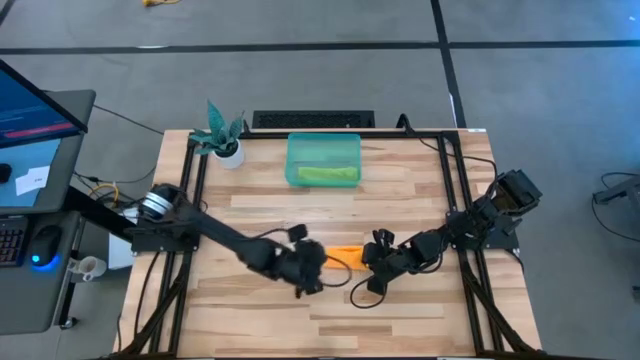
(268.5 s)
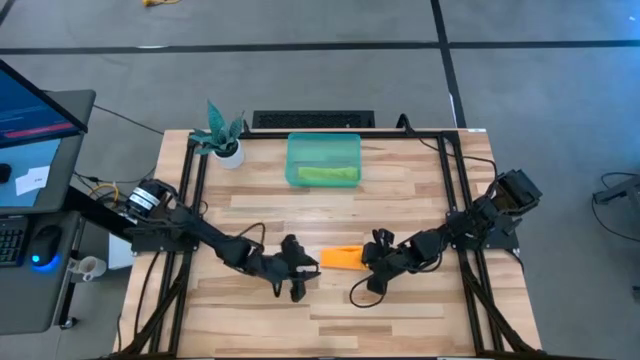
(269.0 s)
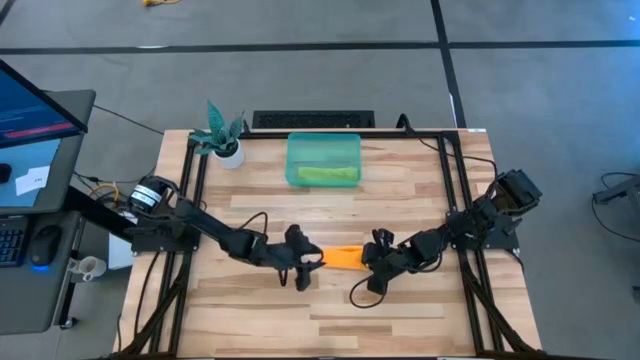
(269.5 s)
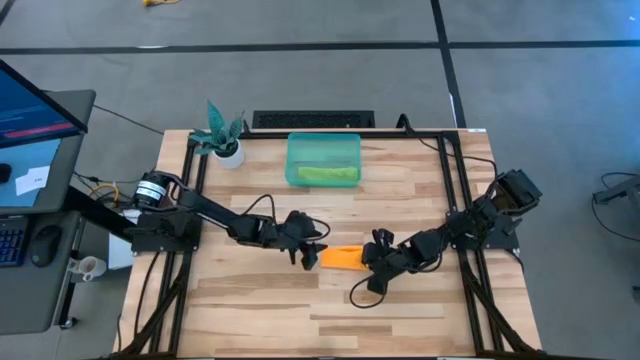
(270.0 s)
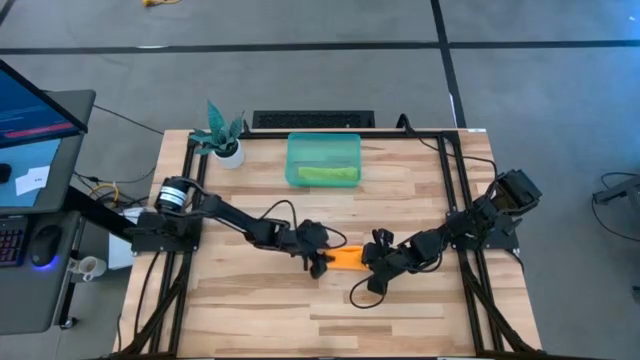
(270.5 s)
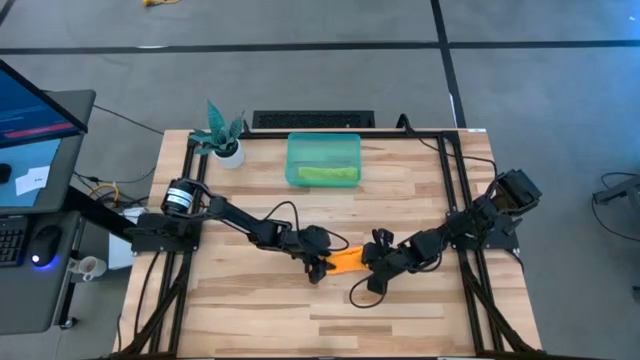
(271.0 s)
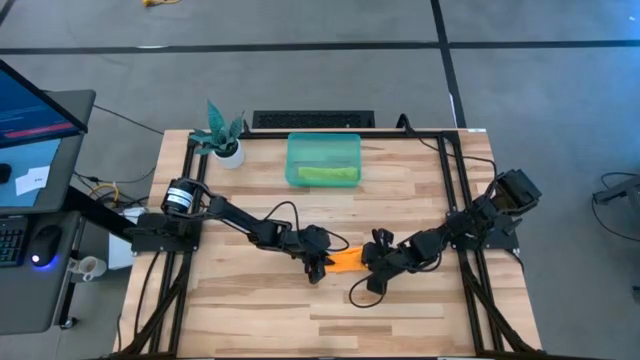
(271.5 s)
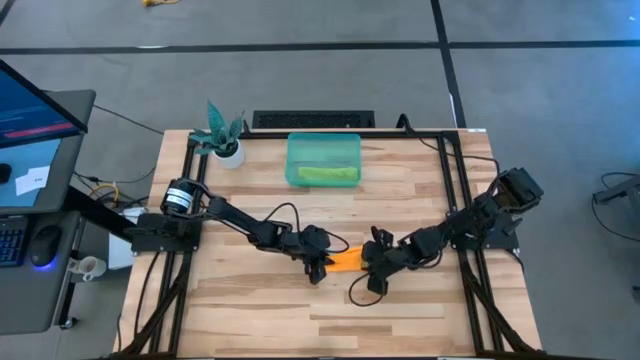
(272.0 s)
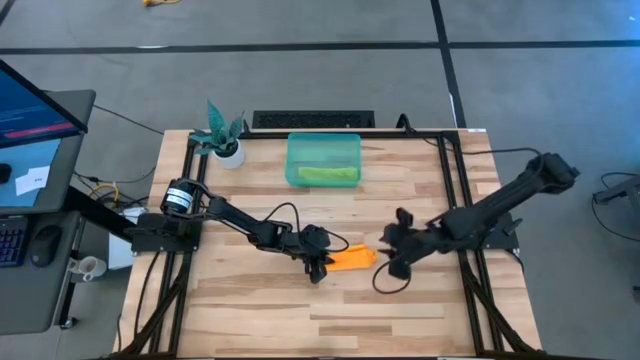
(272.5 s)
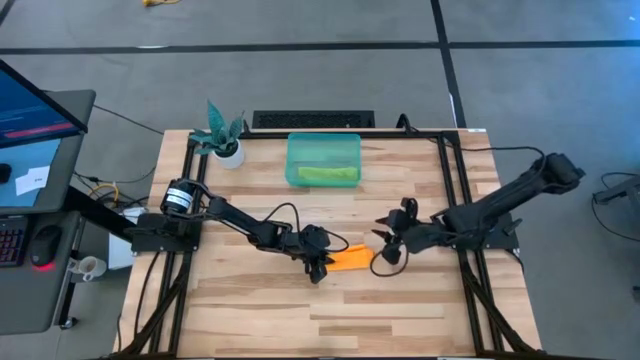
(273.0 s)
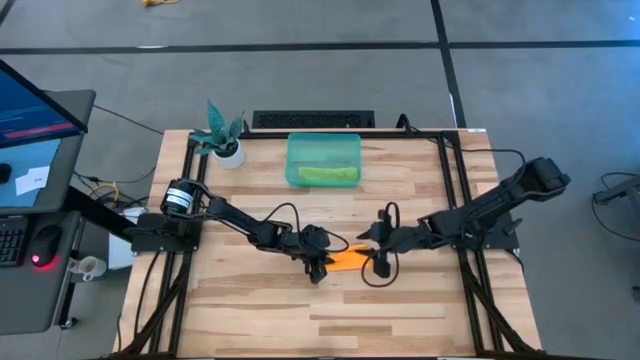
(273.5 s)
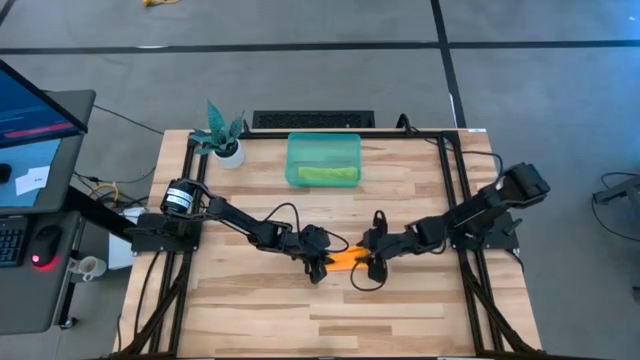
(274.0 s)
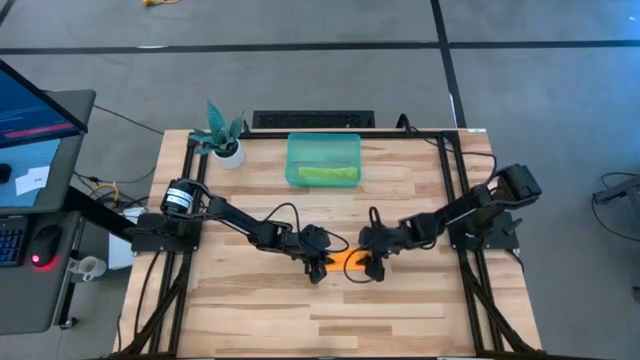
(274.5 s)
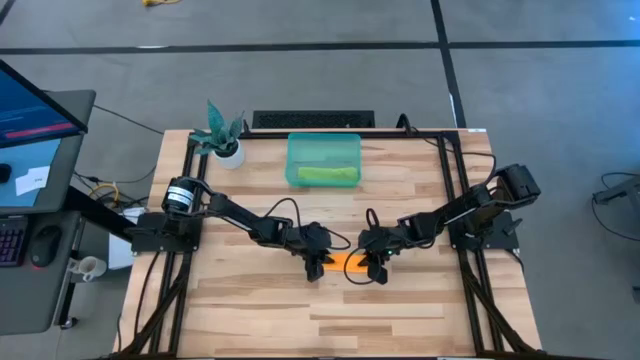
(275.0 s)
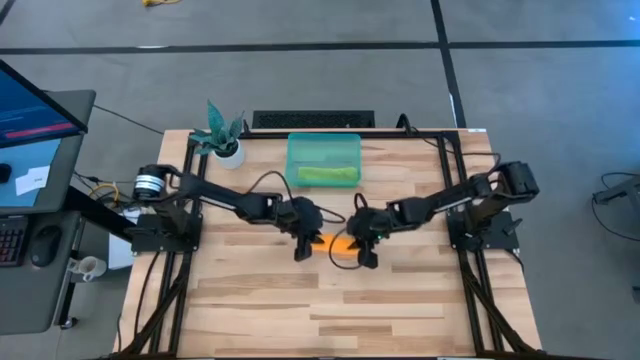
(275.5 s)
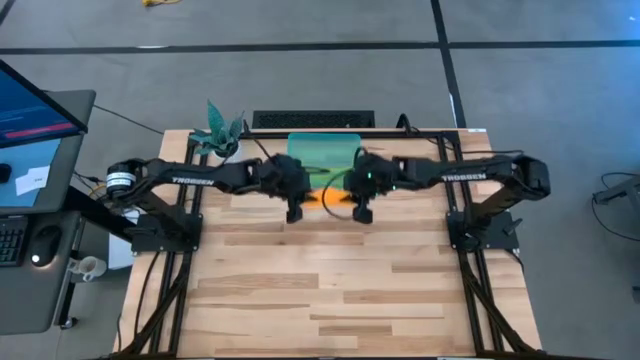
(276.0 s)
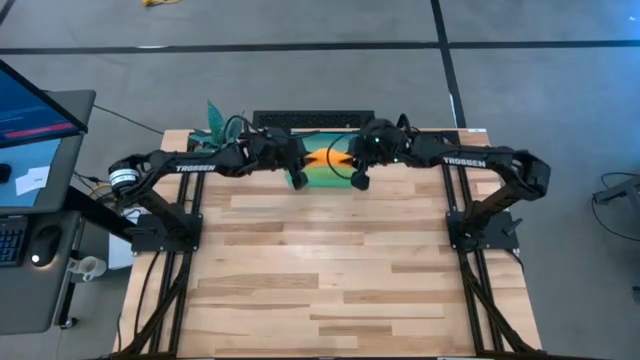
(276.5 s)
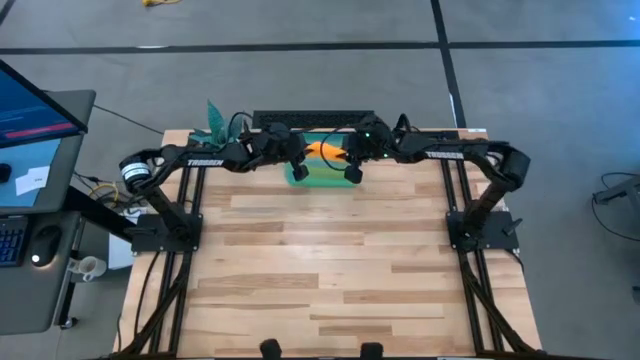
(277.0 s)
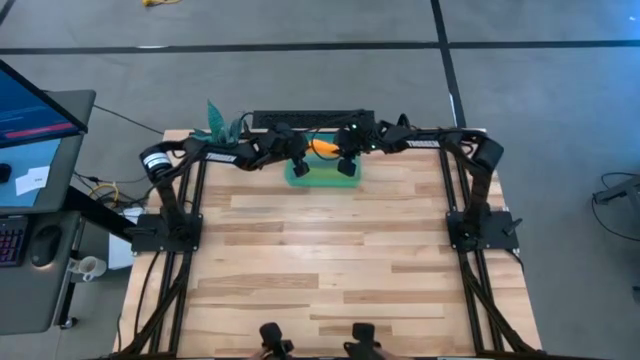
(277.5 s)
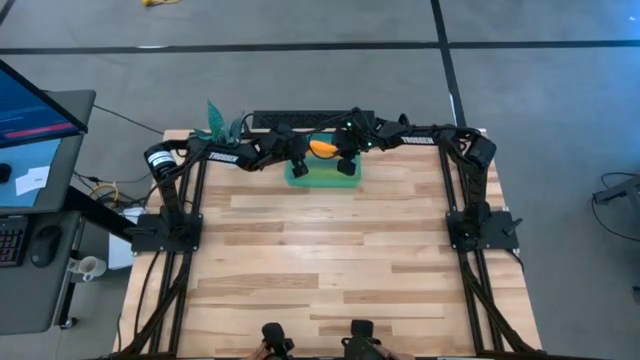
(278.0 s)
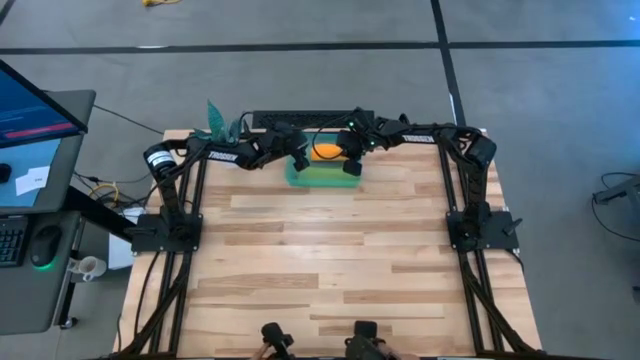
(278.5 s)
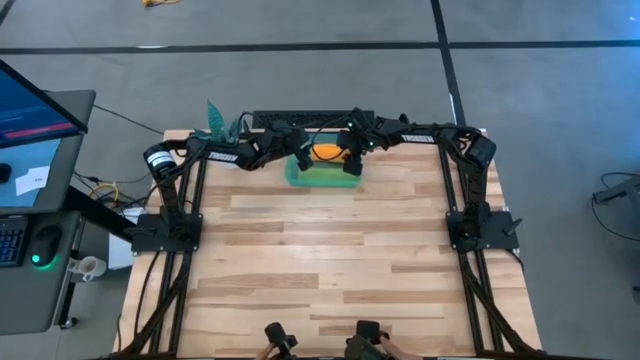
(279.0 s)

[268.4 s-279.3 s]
Task: Roll microfiber towels into tight, uniform cylinder then place into a basket
Put the rolled orange towel into the blue bin

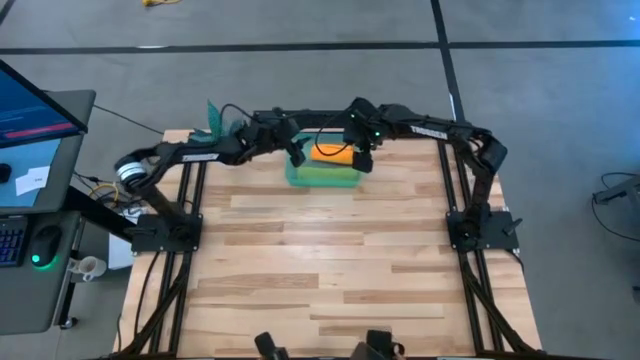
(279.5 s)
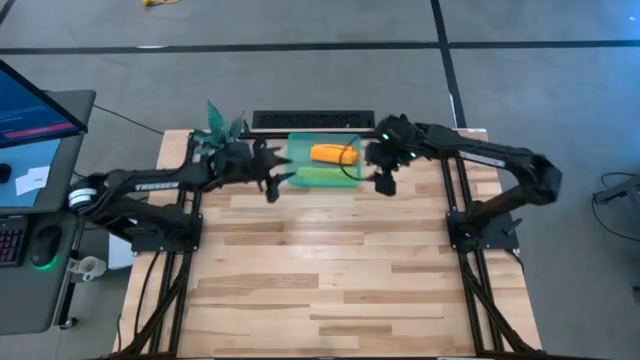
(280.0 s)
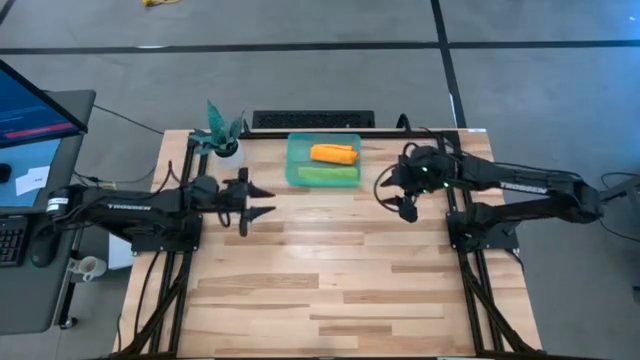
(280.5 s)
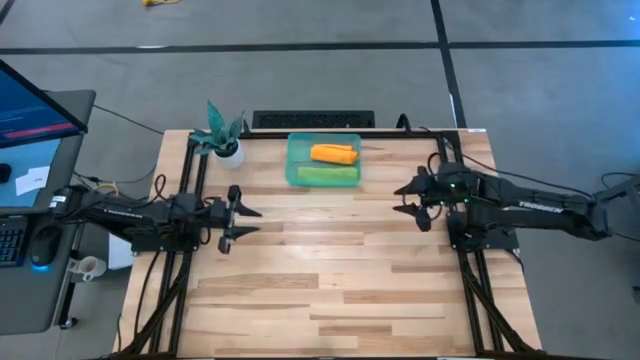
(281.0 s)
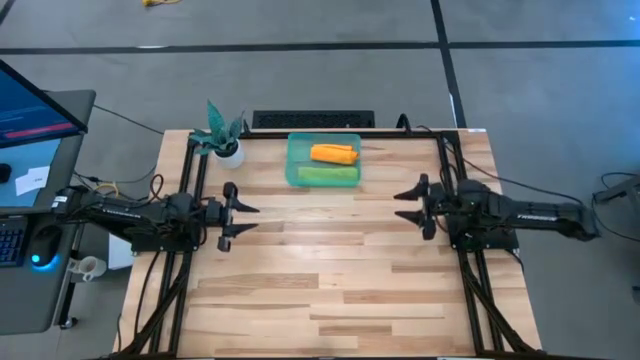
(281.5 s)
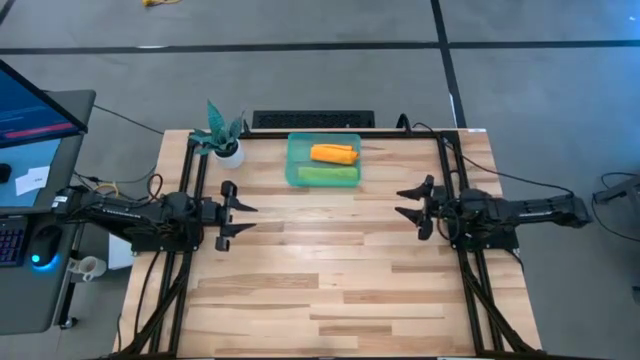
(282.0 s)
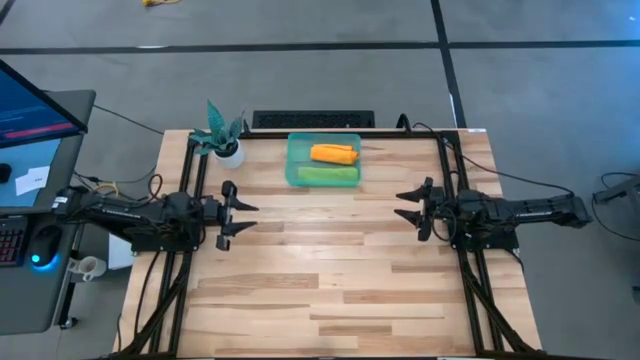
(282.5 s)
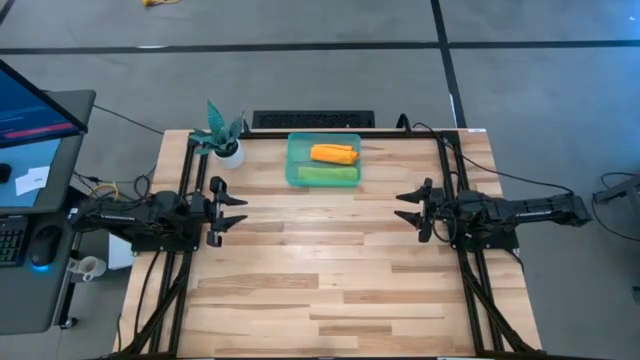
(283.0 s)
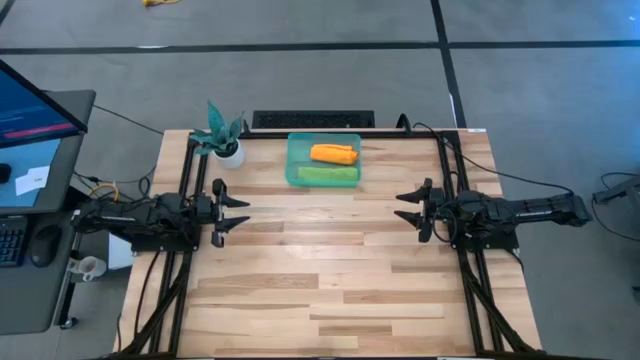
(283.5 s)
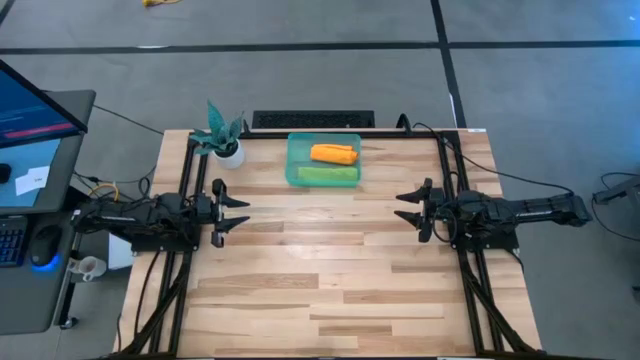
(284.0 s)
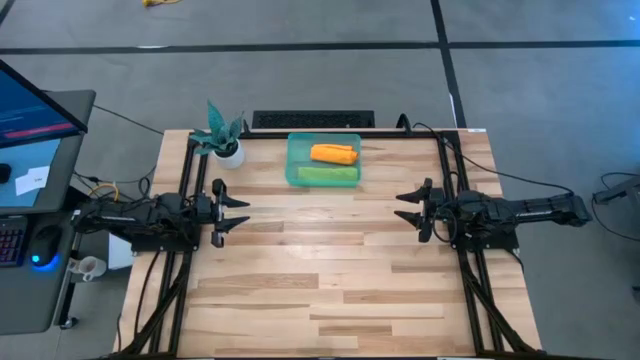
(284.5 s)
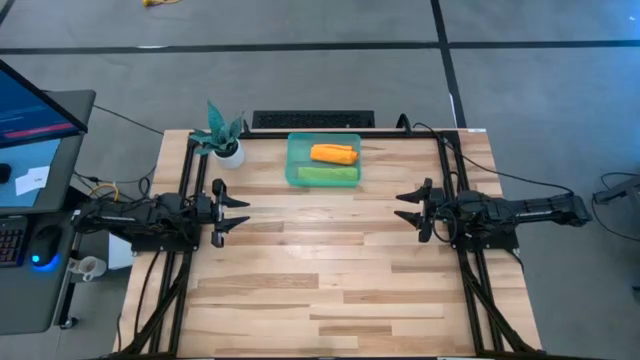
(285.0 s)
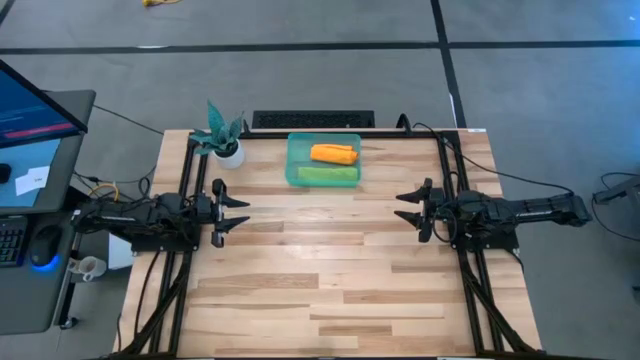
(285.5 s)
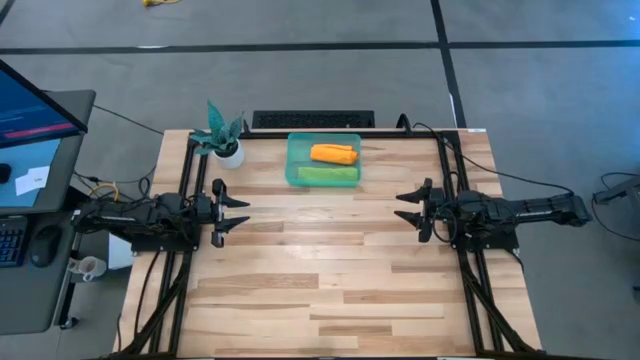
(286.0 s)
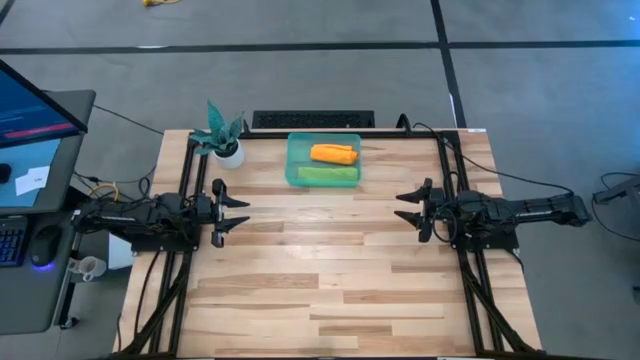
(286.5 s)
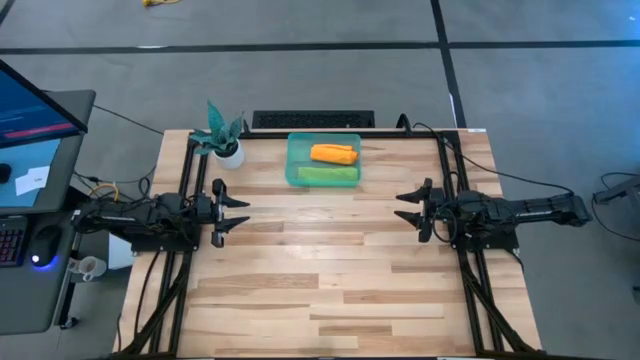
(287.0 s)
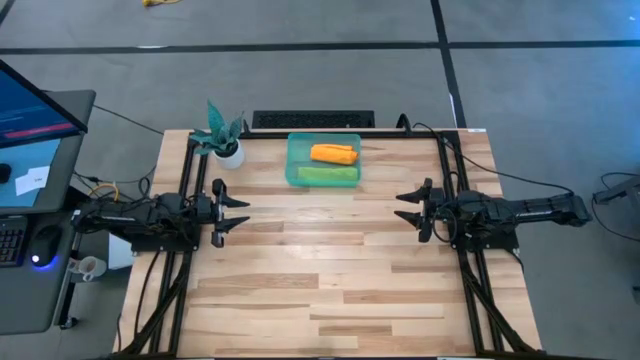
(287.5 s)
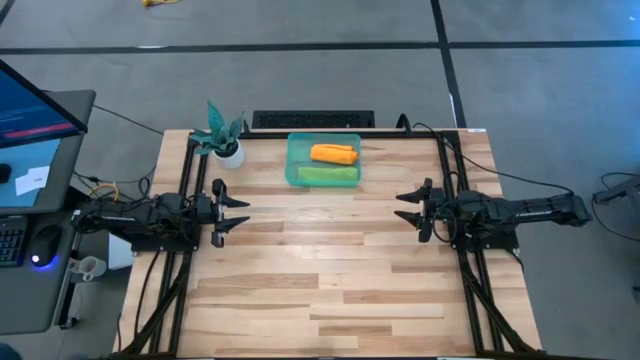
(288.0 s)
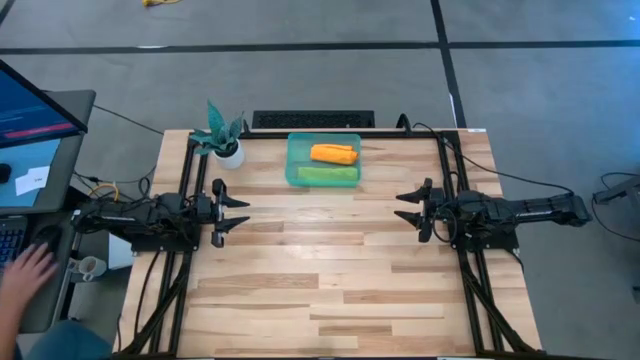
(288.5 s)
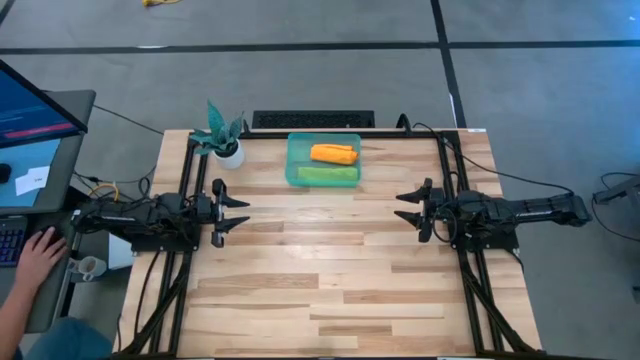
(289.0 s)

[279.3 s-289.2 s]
Return to Home Position
